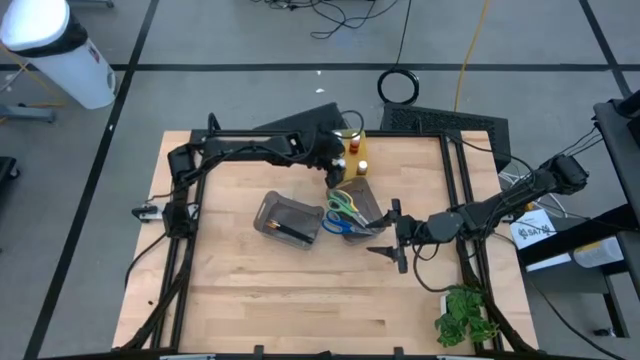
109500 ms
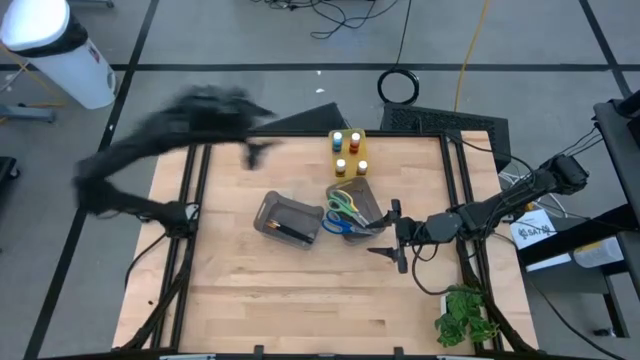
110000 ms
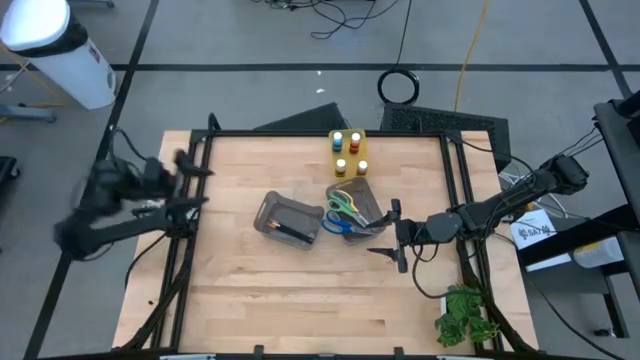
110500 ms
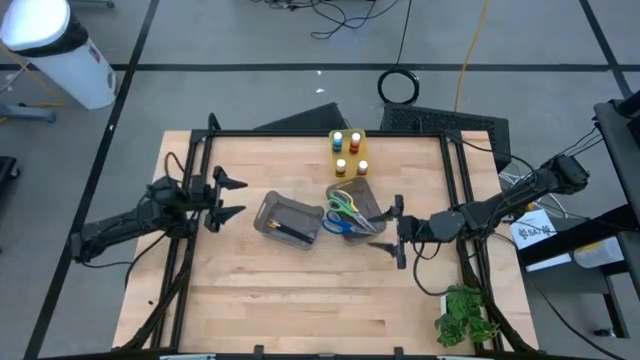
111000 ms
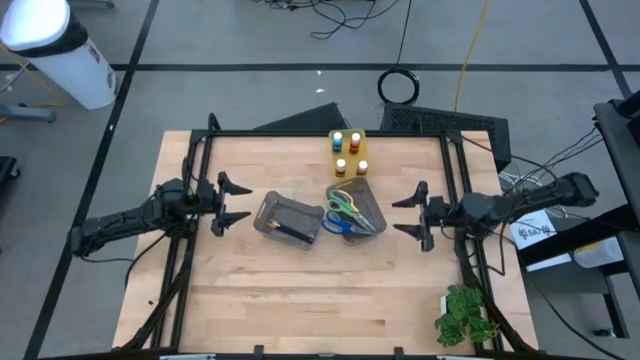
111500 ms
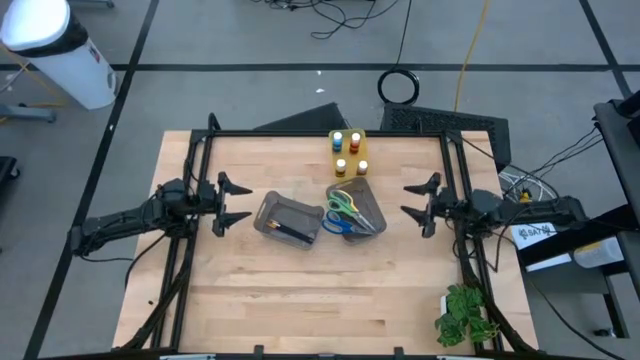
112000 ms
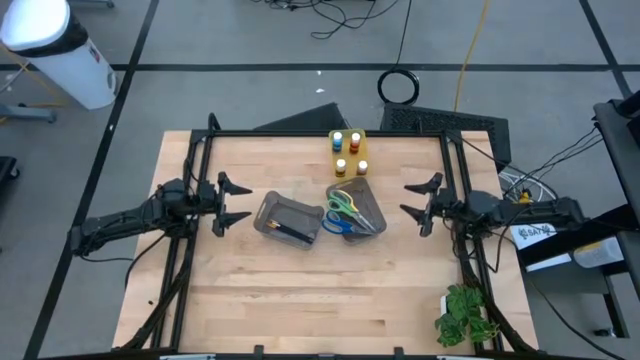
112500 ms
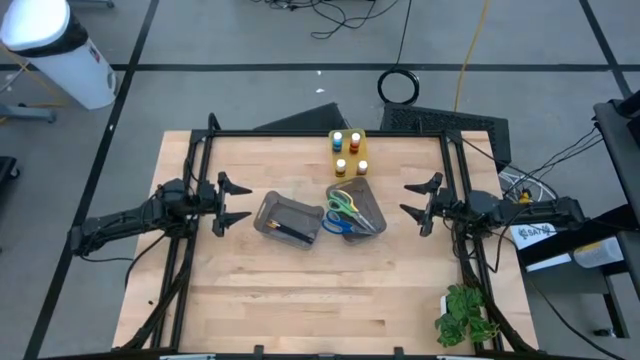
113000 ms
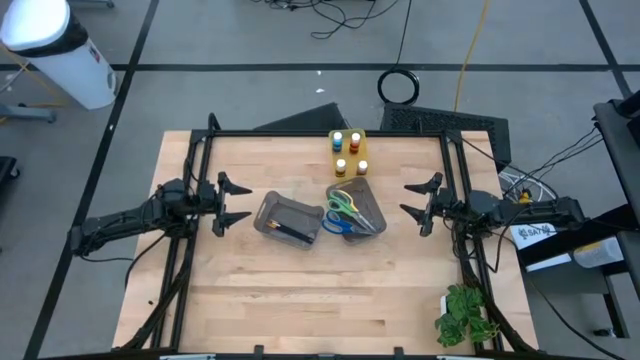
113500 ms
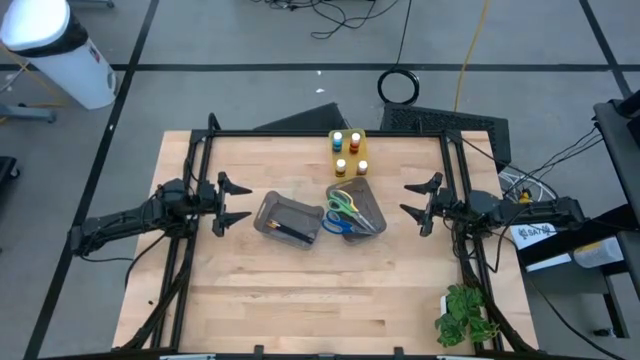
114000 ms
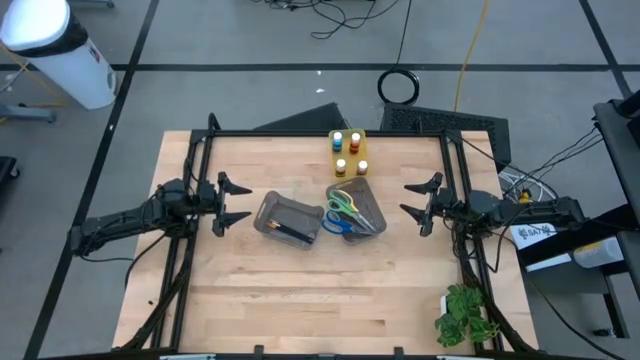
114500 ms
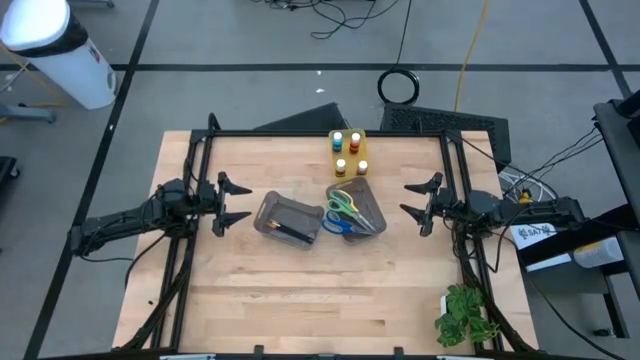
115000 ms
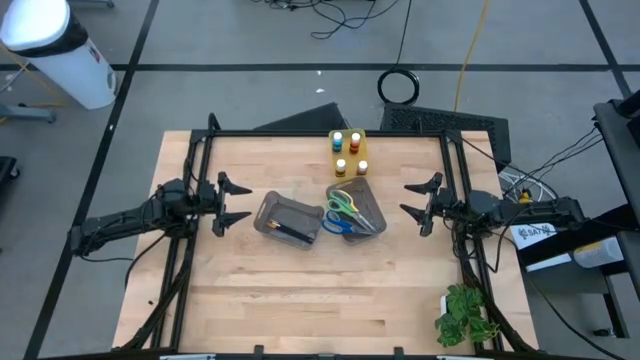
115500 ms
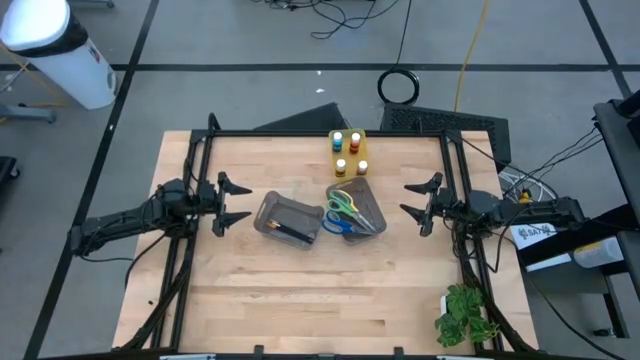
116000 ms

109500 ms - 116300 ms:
Task: Pick & Place Paint Supplies
Return to Home Position

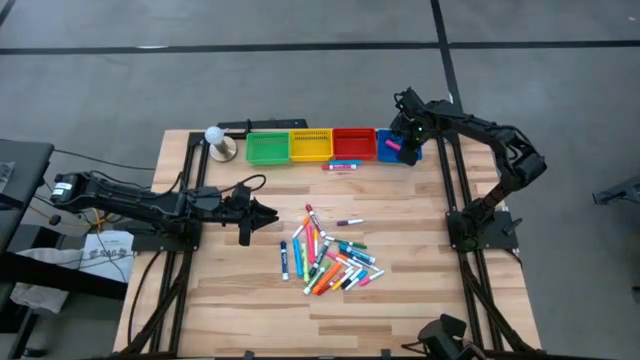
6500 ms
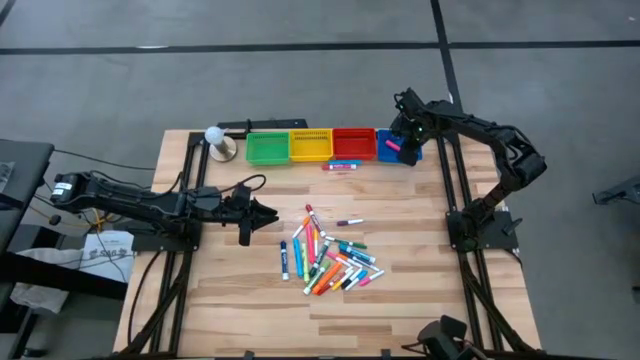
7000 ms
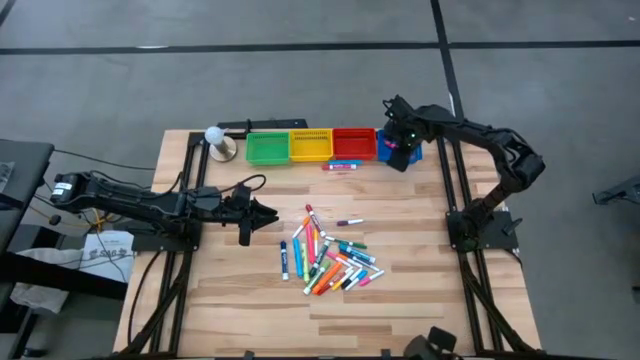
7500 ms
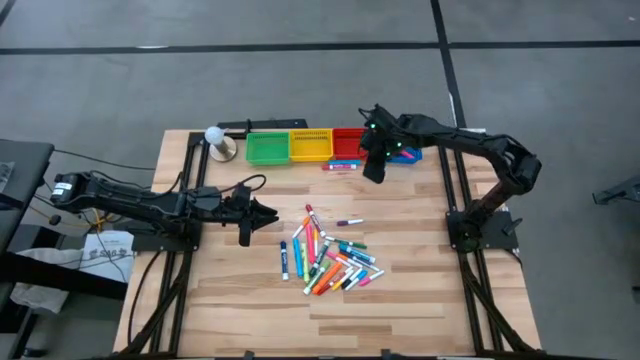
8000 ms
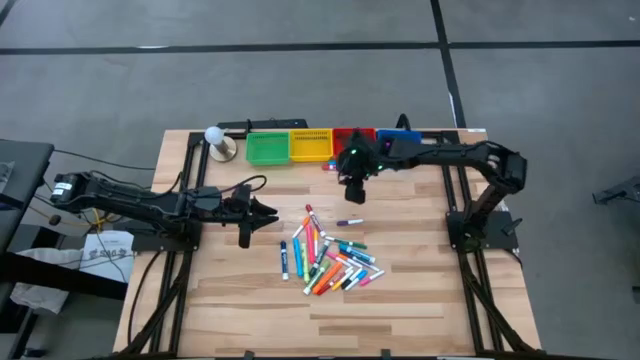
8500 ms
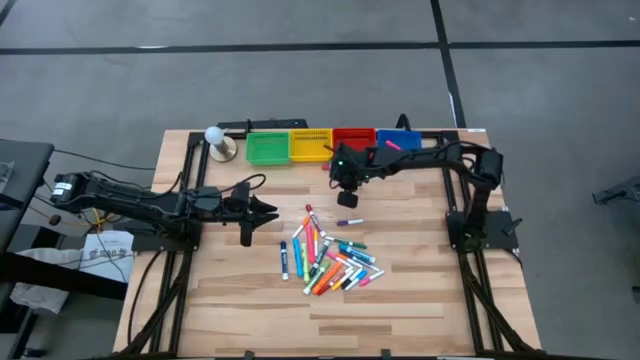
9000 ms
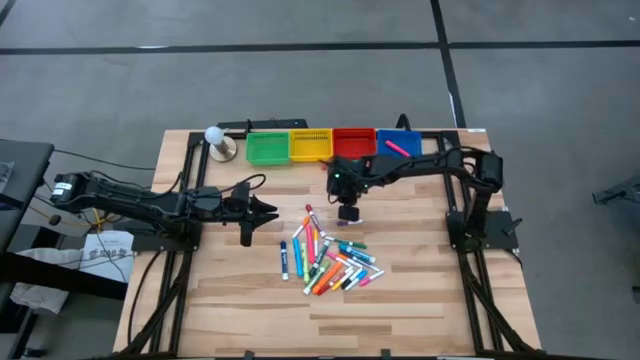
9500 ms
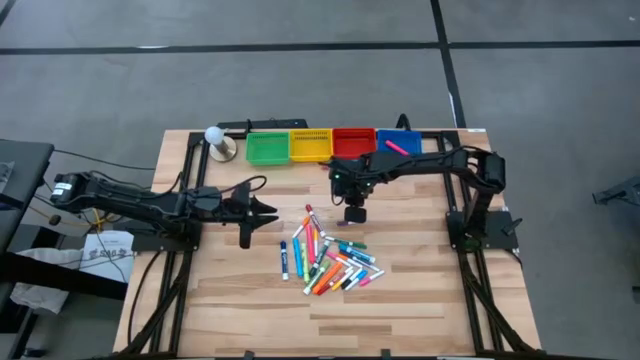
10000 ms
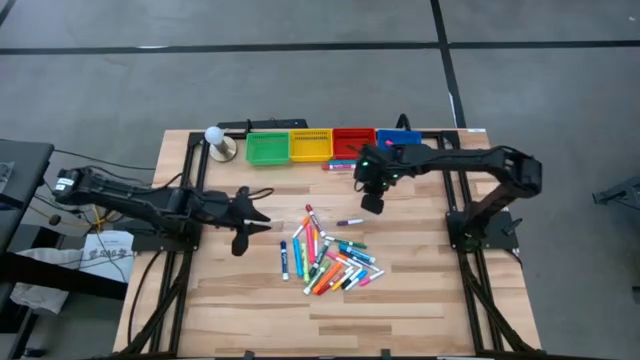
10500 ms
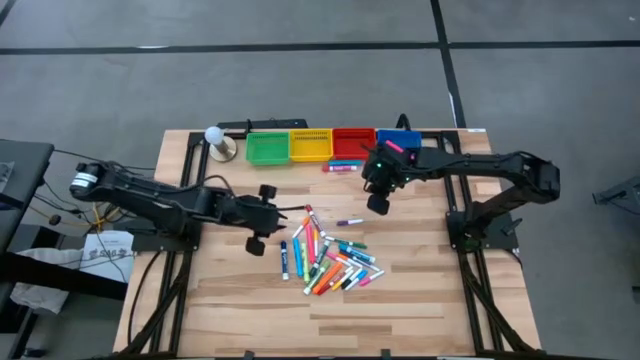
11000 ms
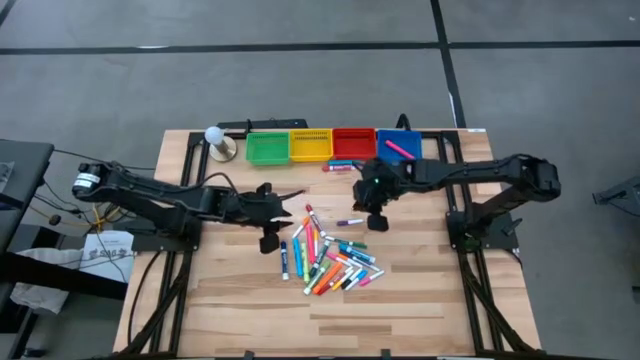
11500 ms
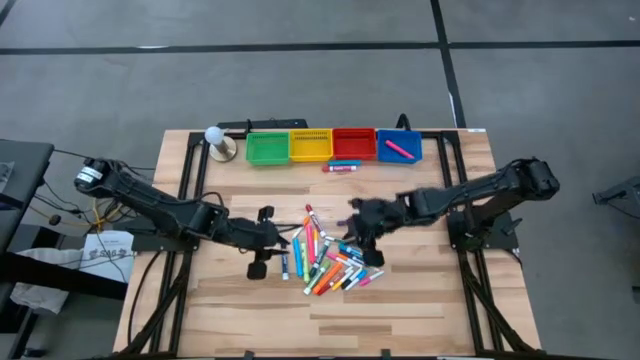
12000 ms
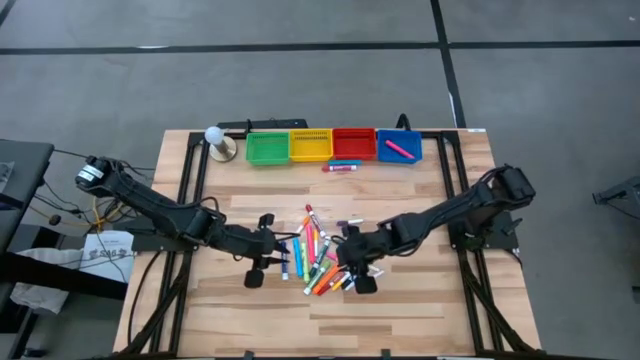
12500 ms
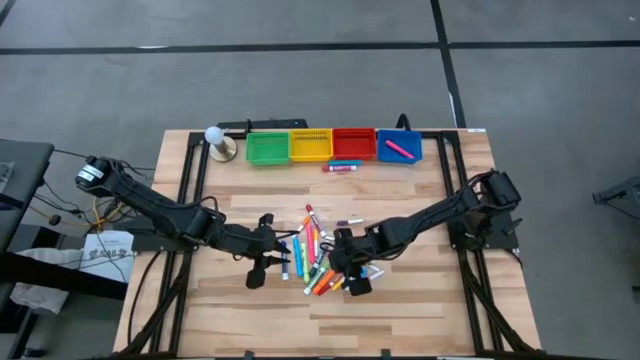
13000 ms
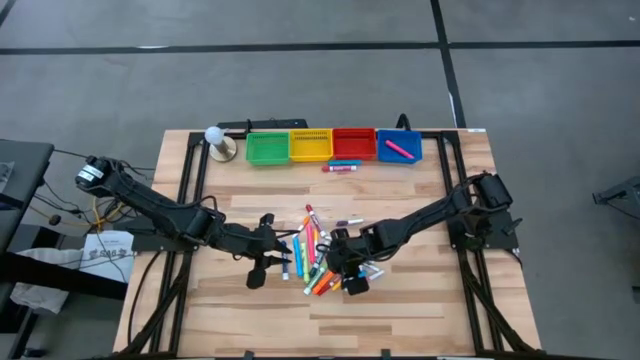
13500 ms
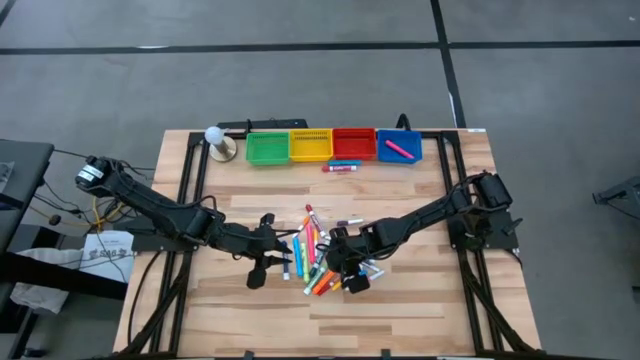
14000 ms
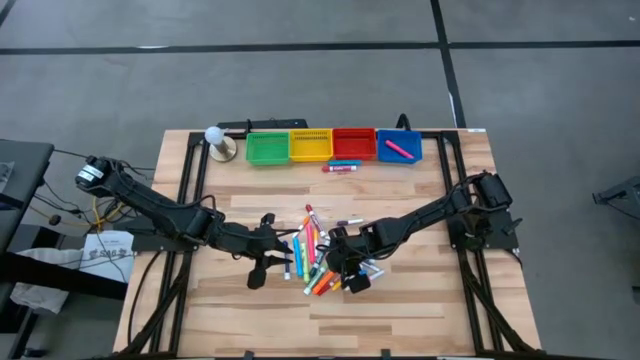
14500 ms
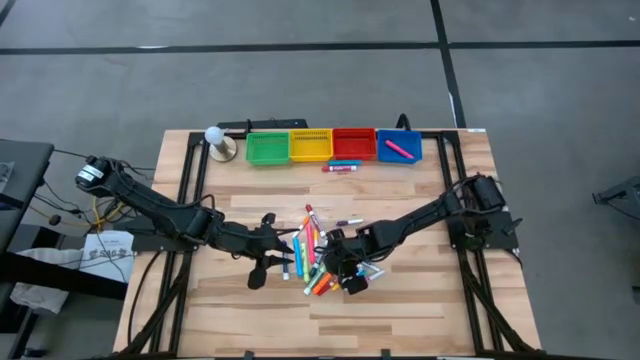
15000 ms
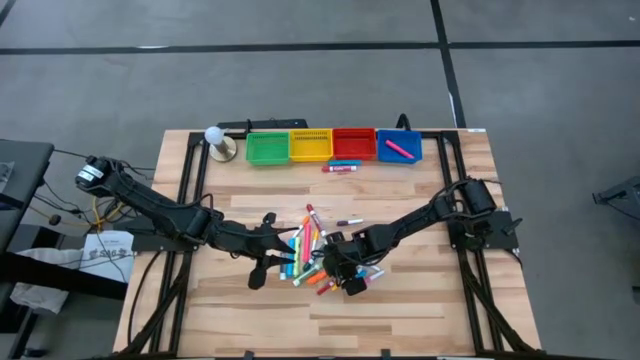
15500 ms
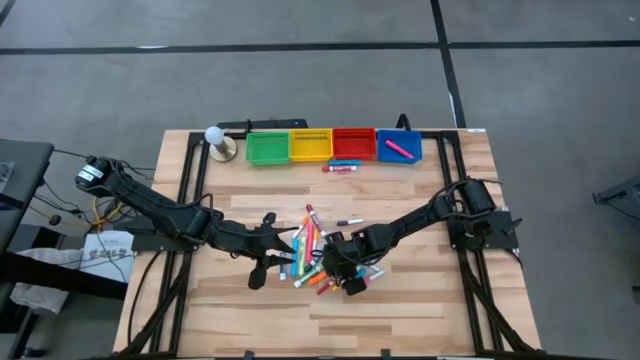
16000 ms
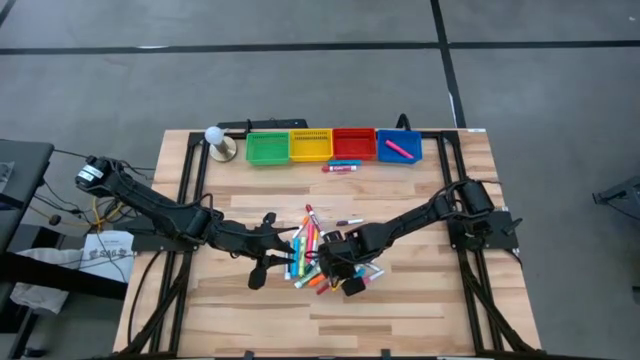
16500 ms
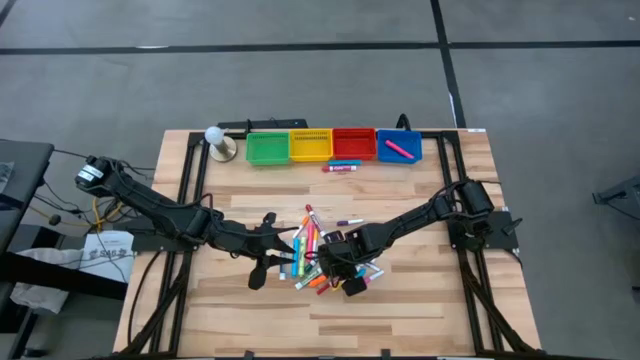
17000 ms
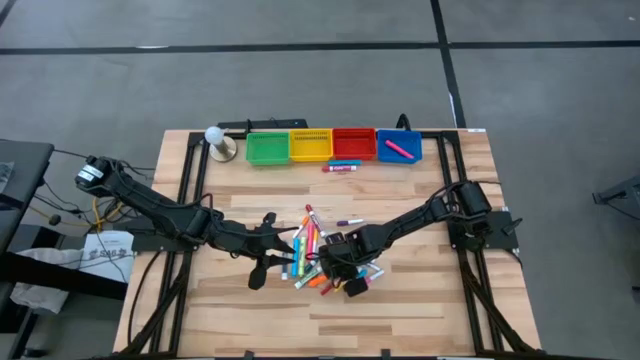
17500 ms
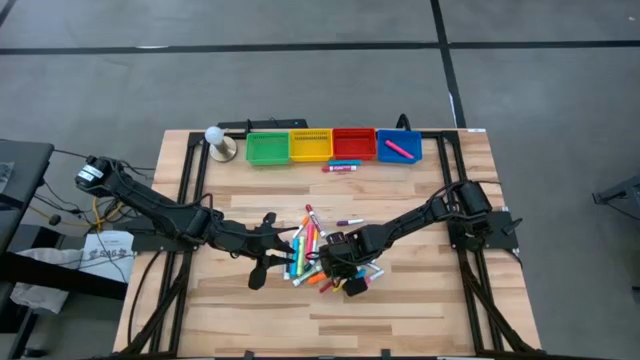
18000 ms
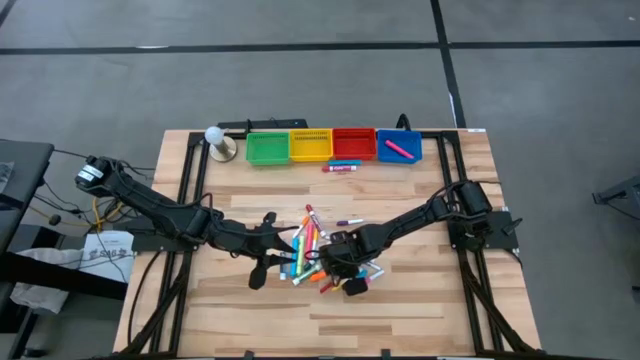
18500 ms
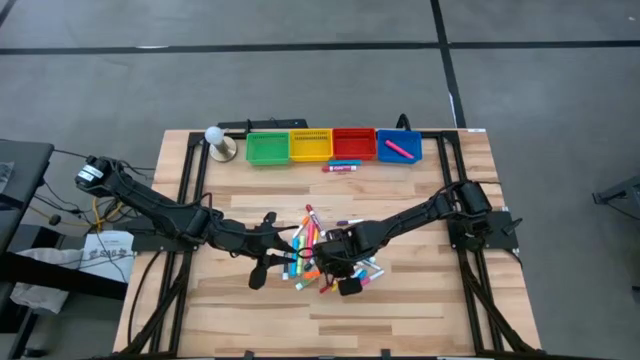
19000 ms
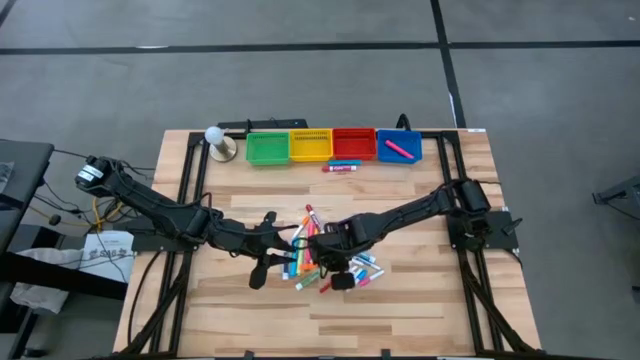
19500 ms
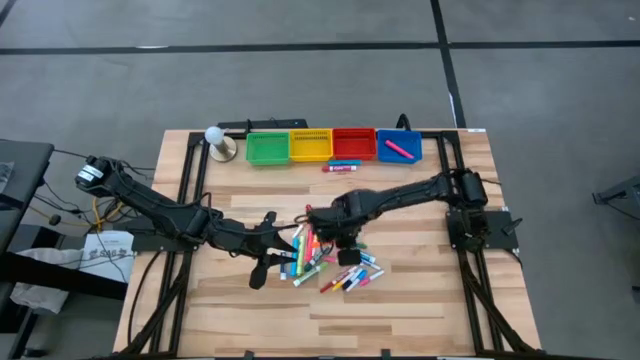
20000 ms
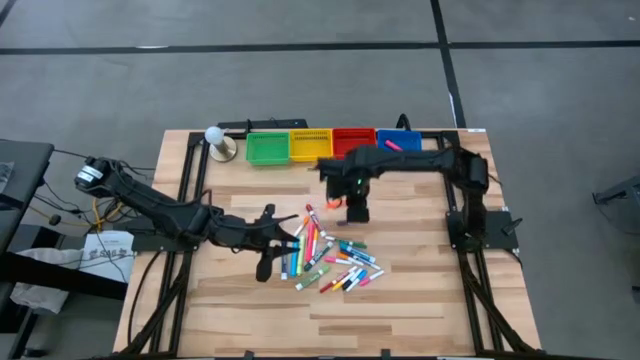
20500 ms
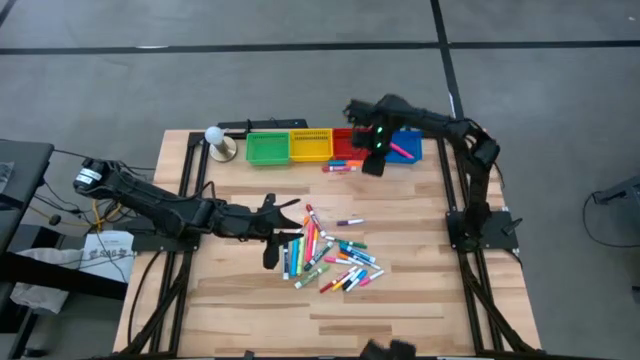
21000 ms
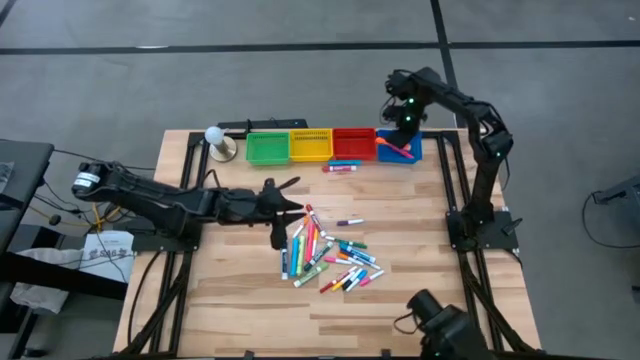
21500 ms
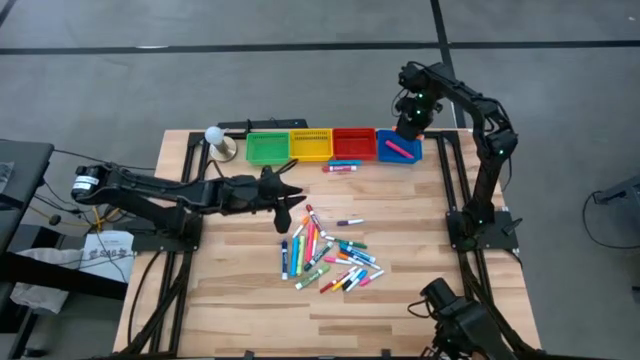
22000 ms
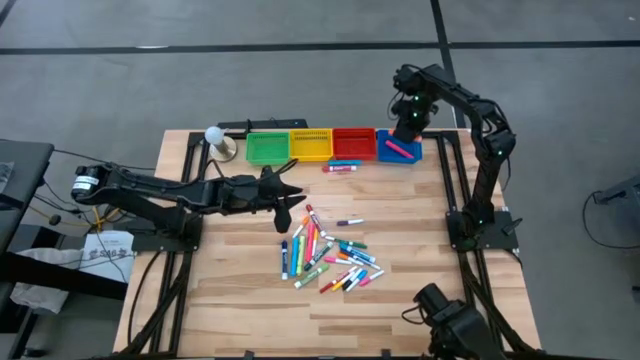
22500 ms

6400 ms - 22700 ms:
Task: Pick & Place Markers
Put the orange highlighter pen into the blue basket
